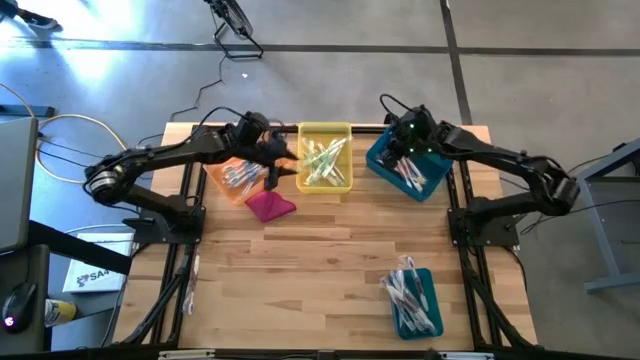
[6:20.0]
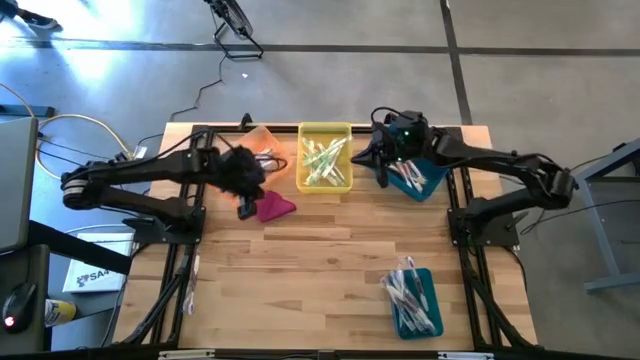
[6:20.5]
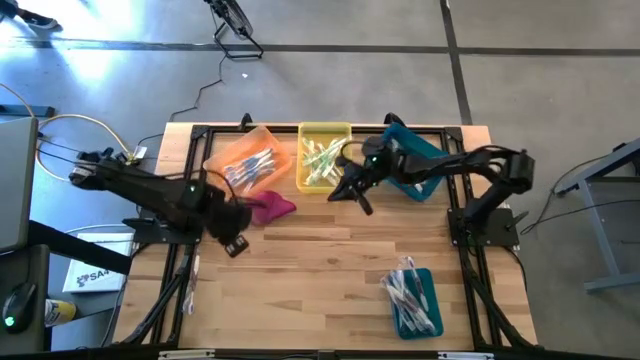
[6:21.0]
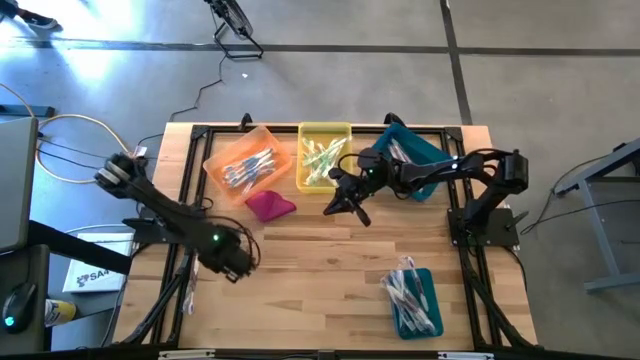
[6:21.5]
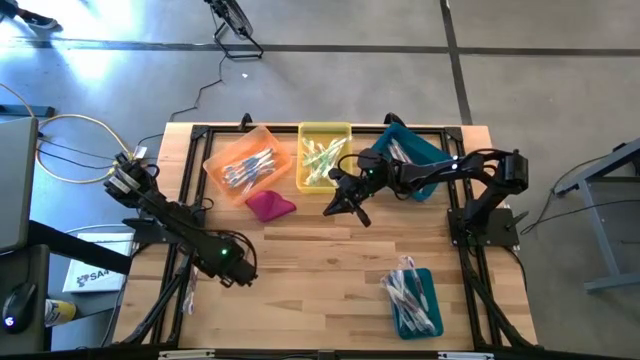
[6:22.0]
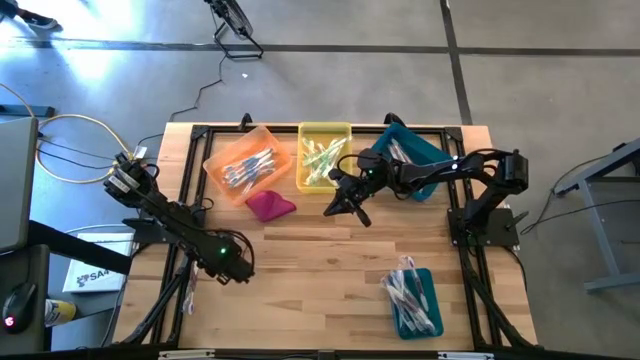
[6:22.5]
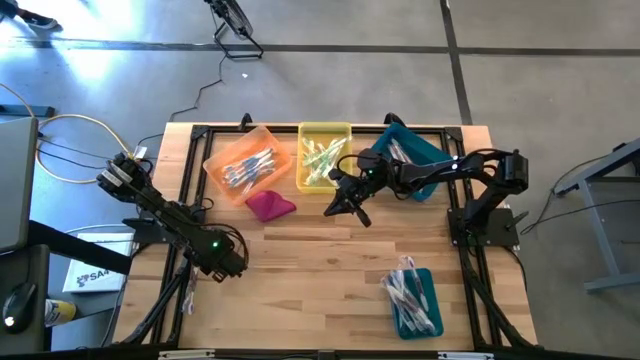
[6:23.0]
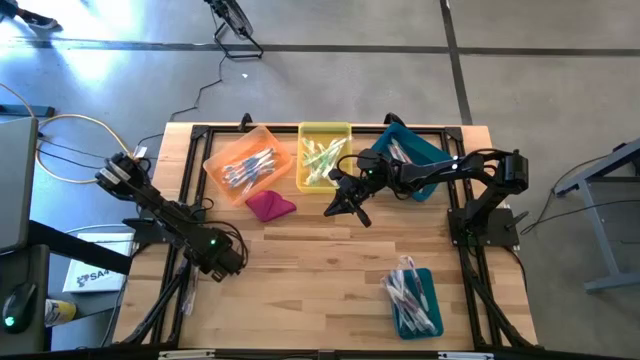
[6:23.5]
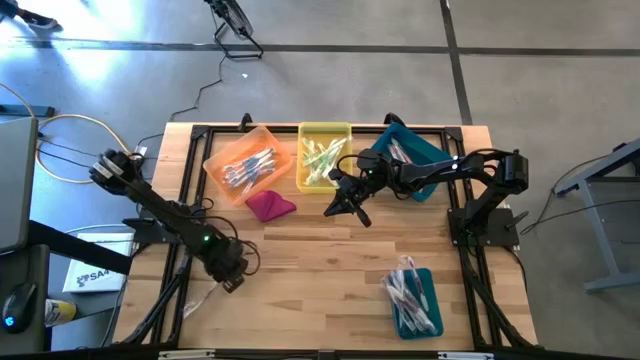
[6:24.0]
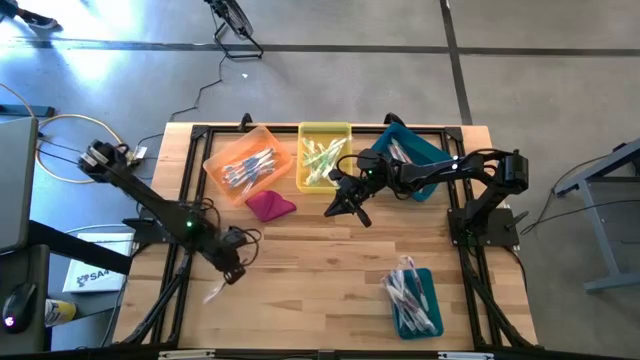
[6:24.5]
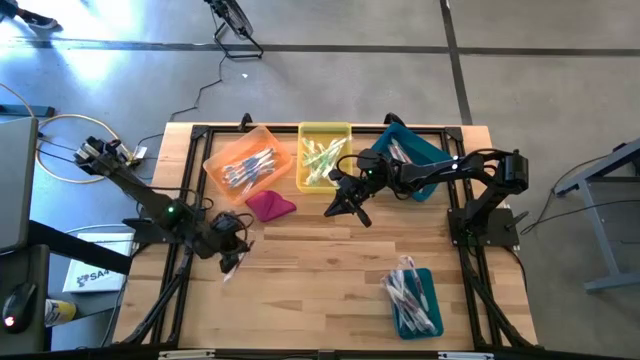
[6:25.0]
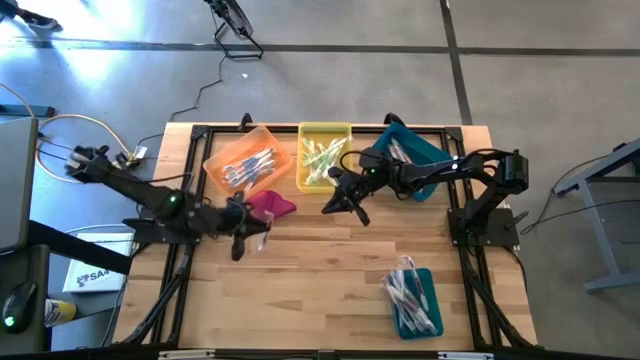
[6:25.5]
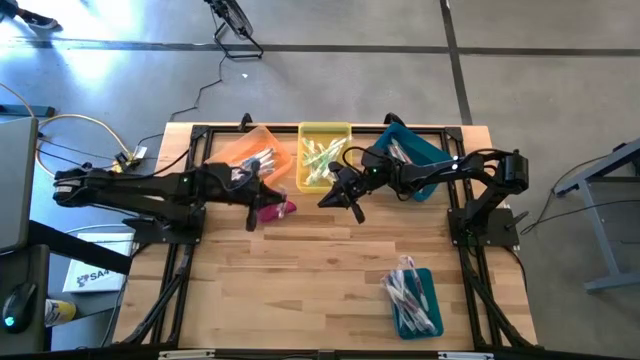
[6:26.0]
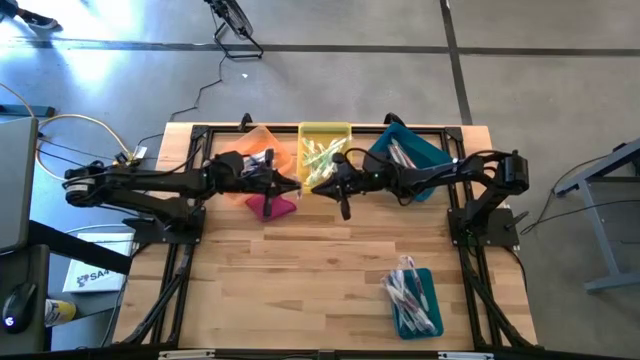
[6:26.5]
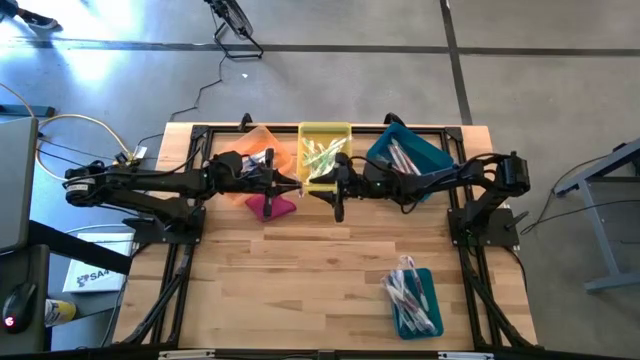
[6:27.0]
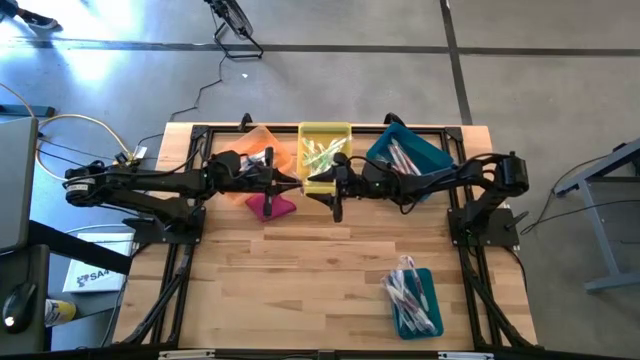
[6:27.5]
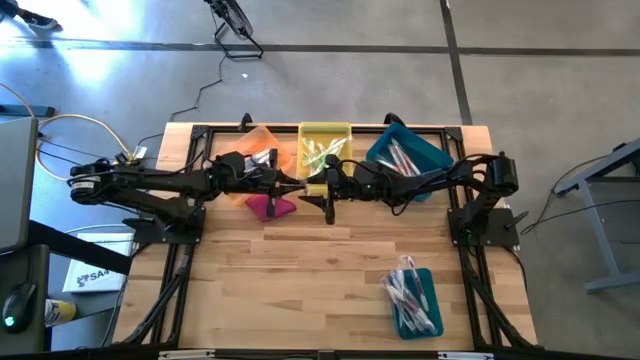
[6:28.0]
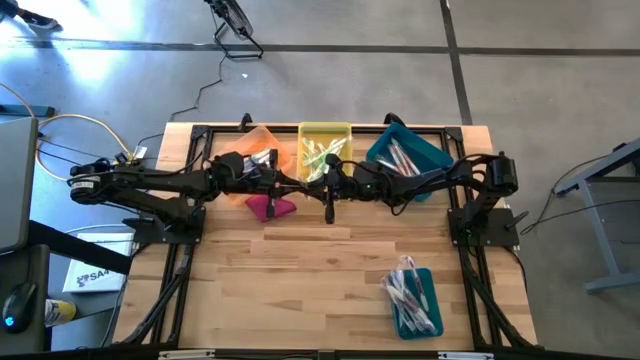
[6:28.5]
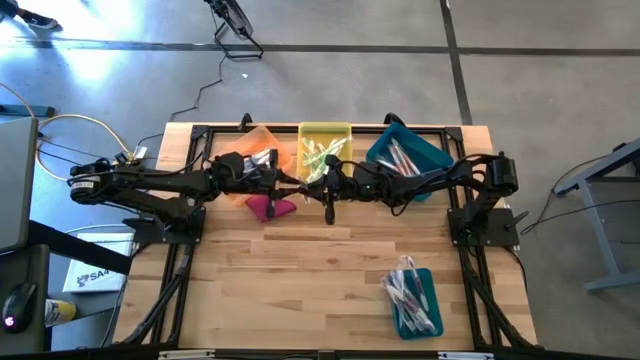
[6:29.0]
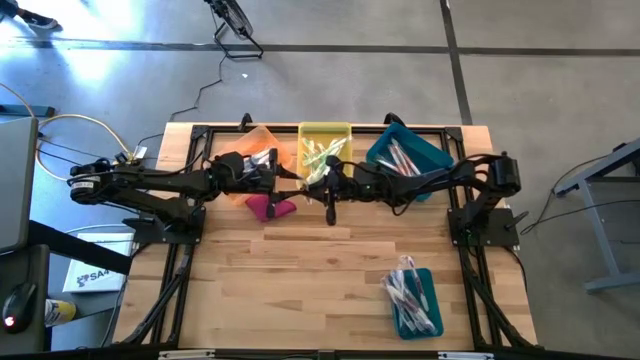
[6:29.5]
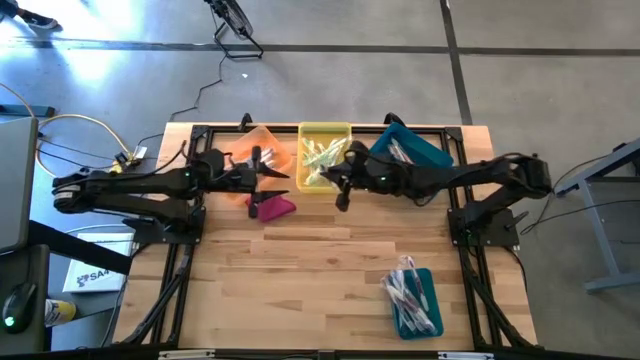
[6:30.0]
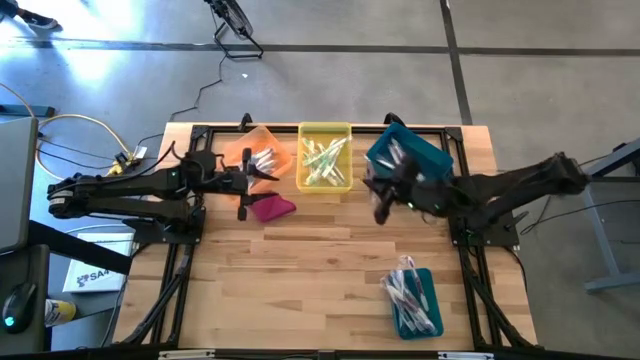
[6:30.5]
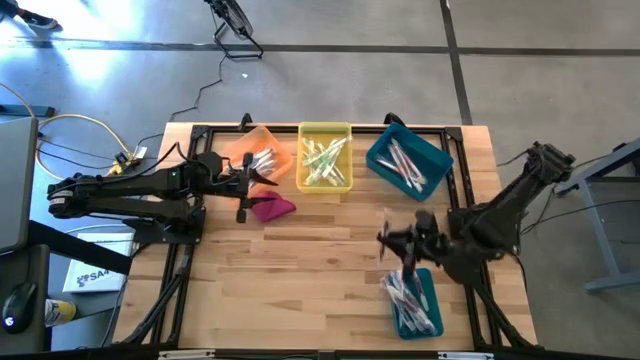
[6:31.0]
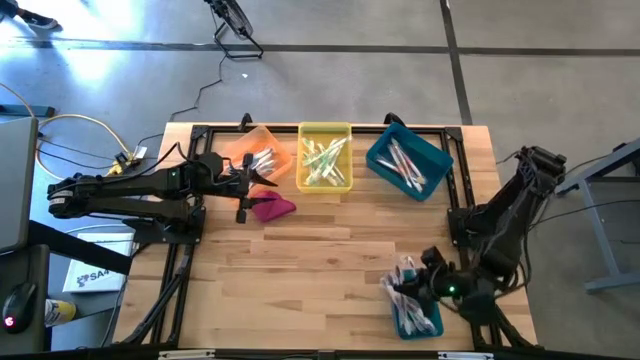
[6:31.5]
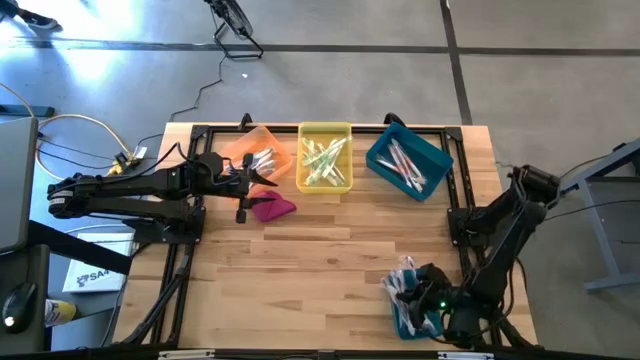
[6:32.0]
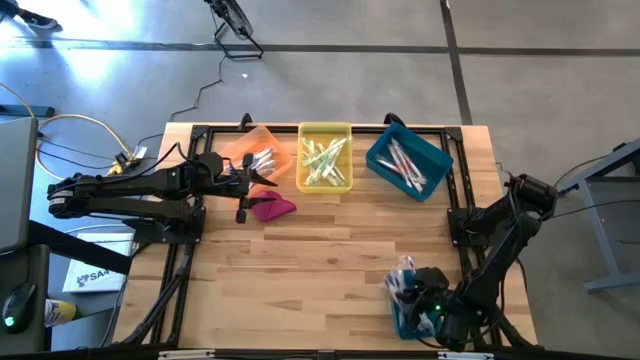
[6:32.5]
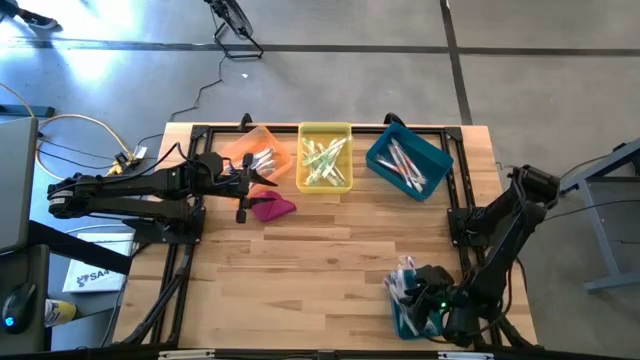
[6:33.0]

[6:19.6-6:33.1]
Task: Pick & Place Toothbrushes
Put the purple toothbrush into the bottom blue bin

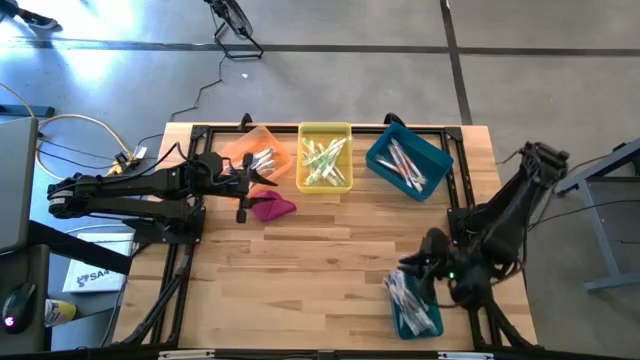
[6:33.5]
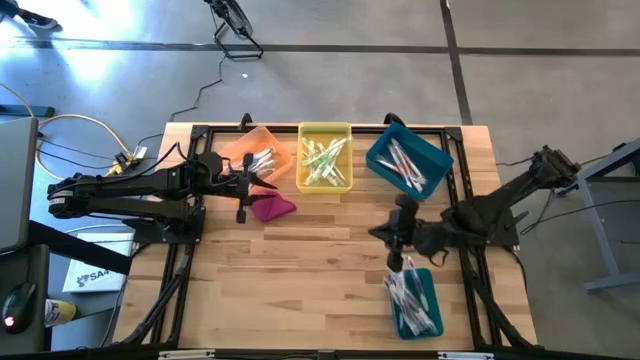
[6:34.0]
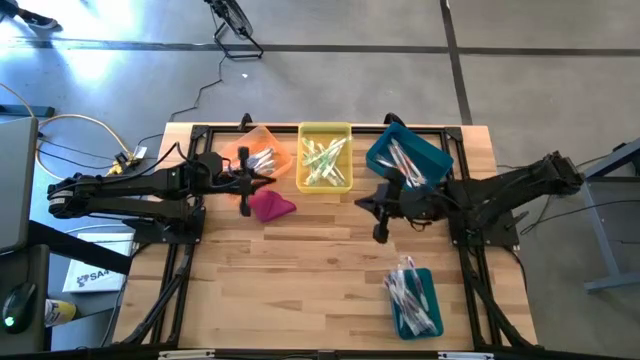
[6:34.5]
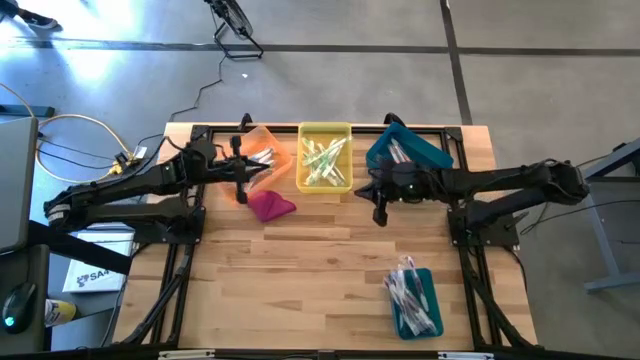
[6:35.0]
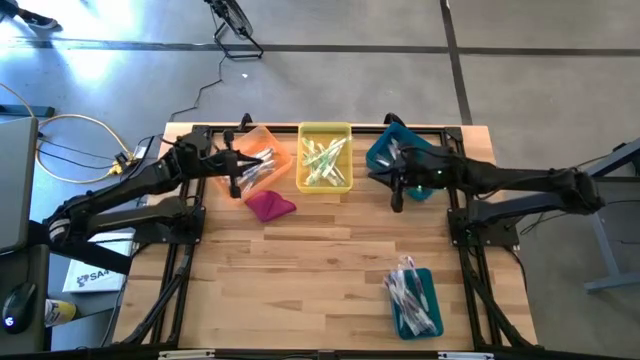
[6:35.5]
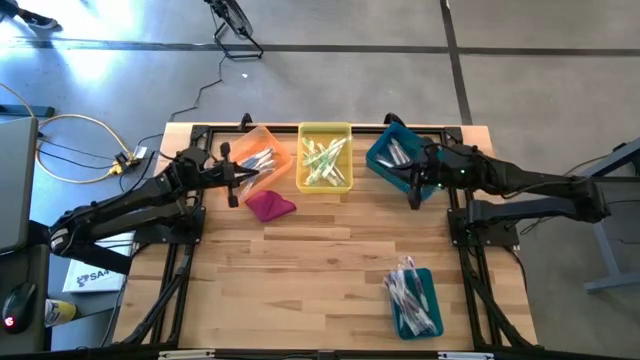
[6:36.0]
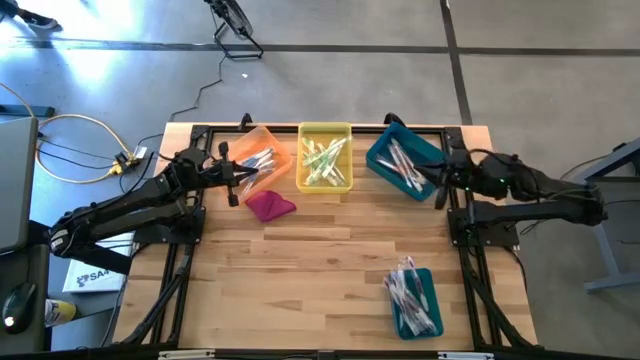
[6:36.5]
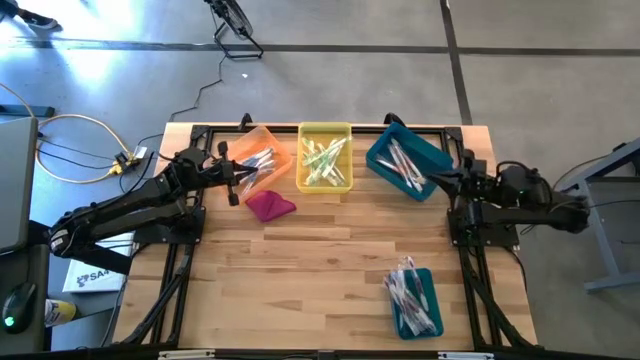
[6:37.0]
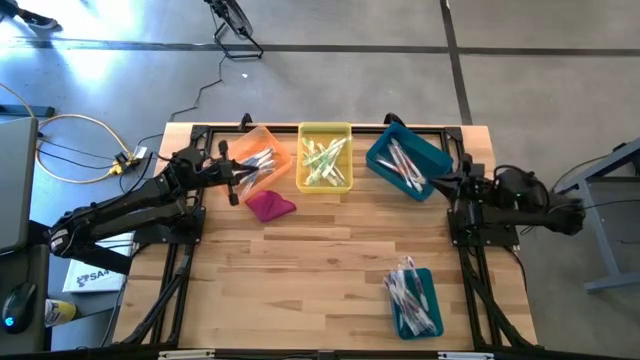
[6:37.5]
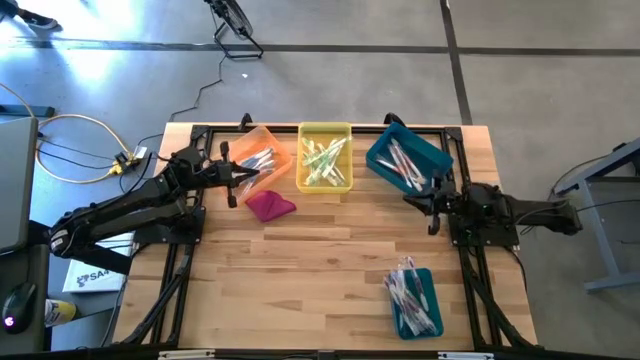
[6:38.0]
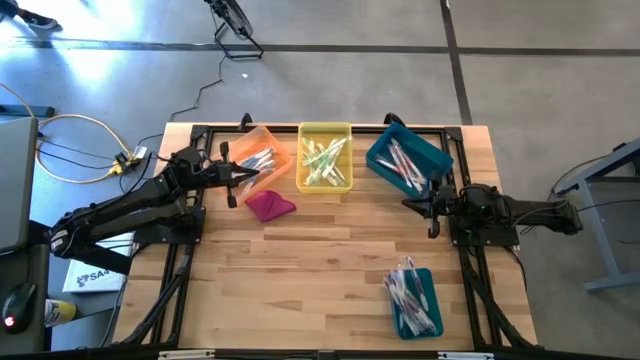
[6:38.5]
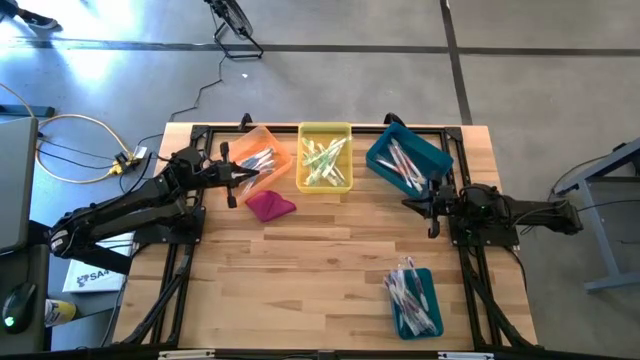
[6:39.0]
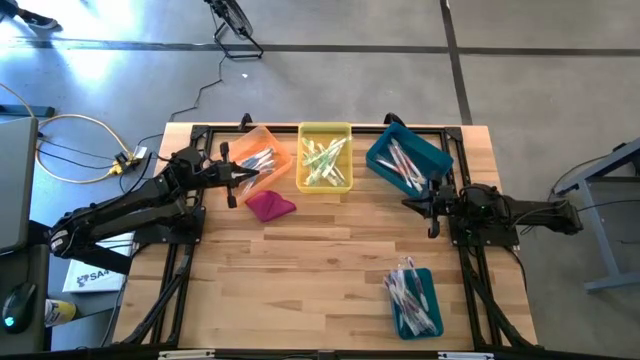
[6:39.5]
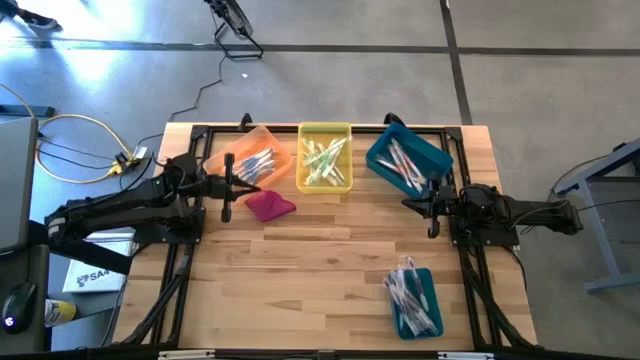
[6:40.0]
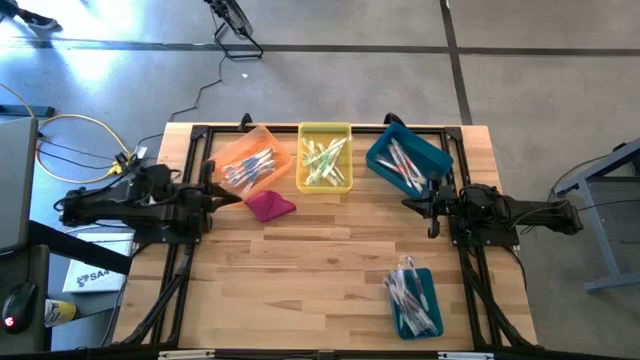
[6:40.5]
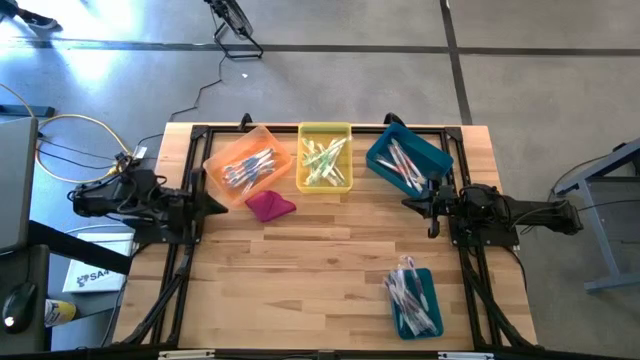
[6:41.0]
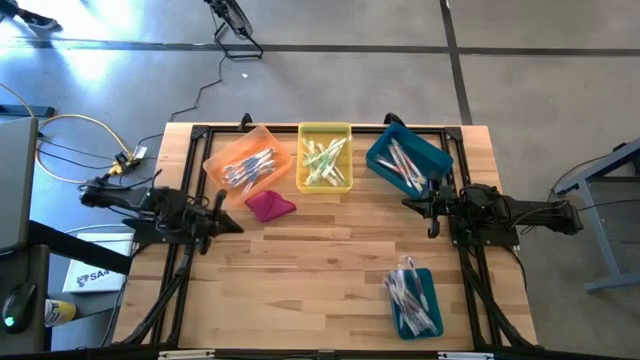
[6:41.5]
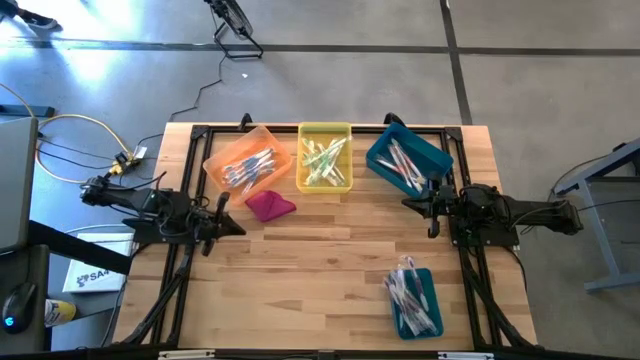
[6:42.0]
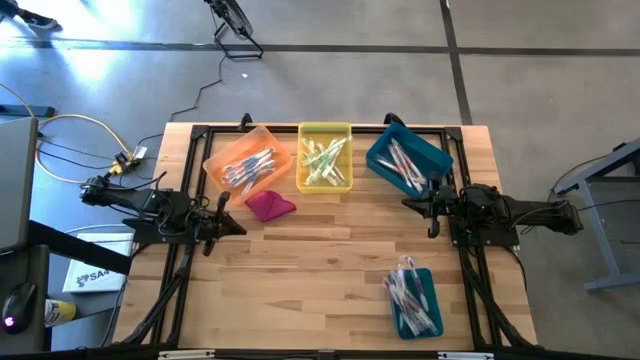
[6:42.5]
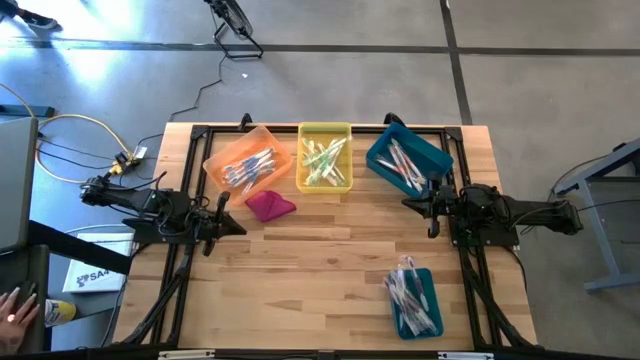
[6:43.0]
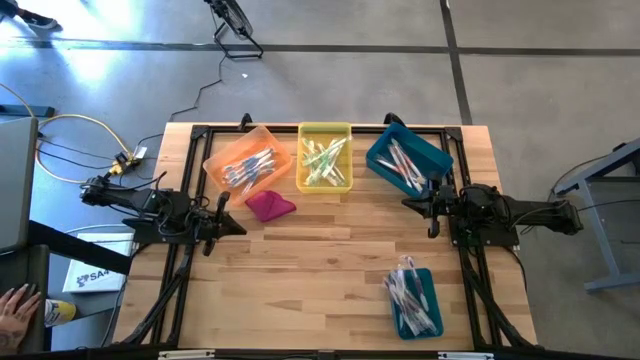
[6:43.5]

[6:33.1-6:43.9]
Return to home position
